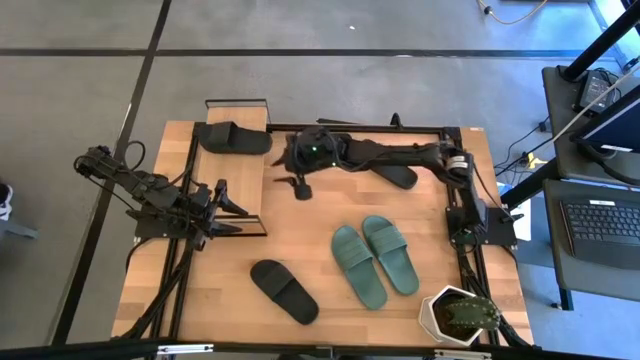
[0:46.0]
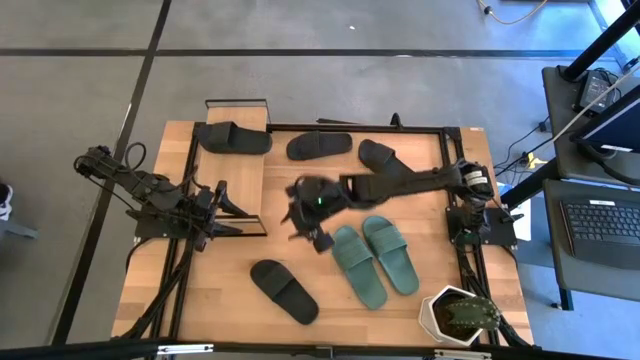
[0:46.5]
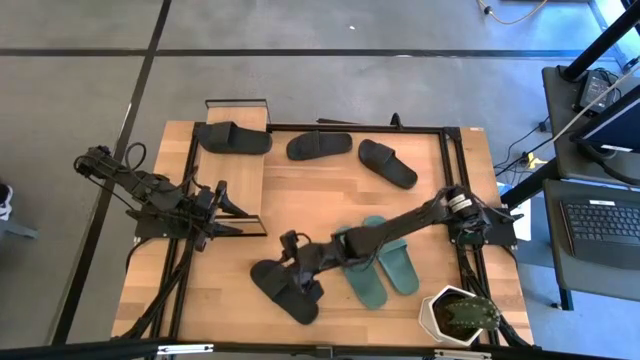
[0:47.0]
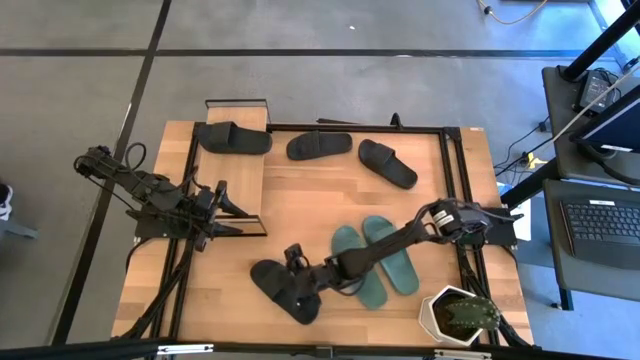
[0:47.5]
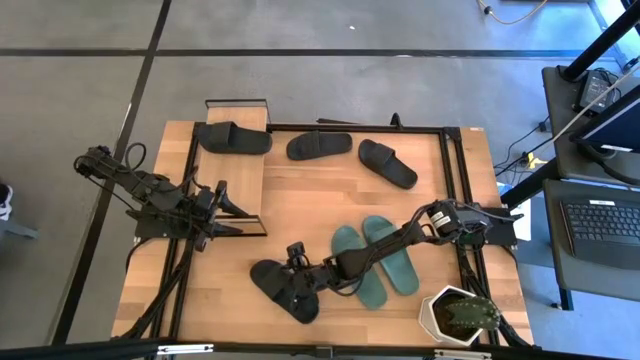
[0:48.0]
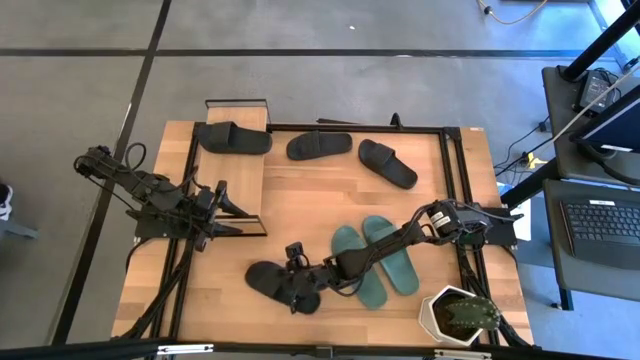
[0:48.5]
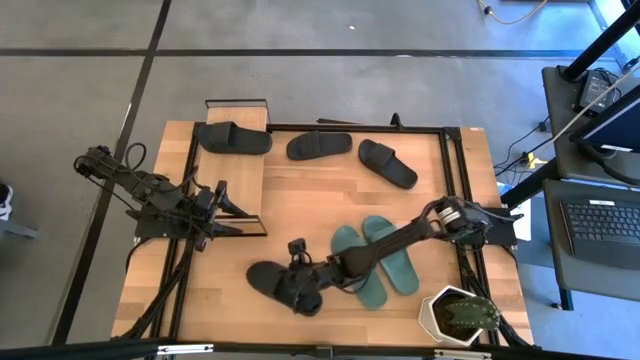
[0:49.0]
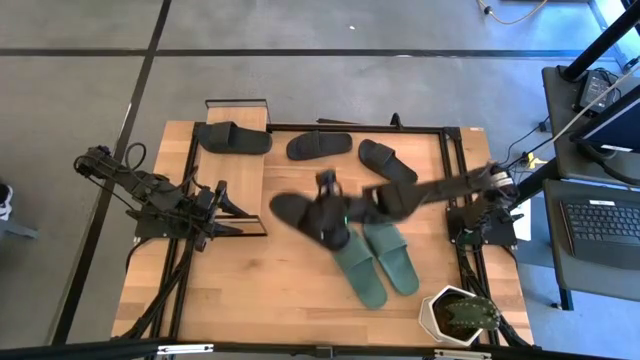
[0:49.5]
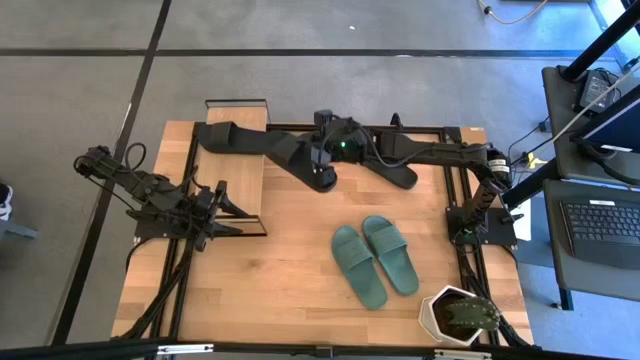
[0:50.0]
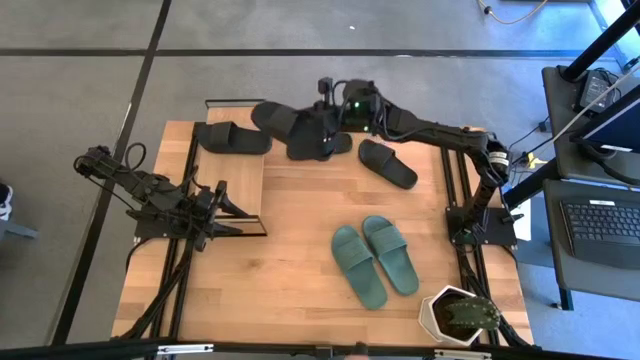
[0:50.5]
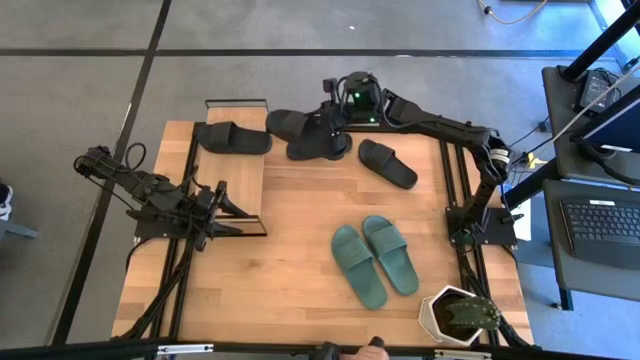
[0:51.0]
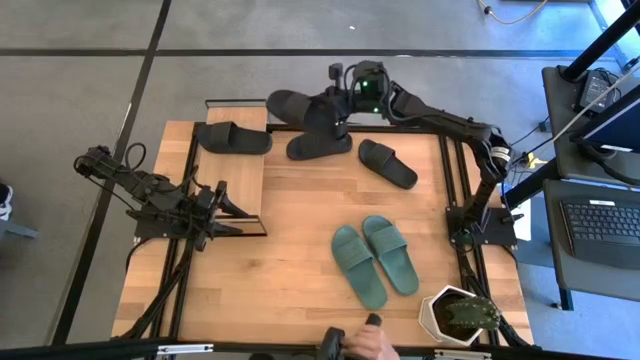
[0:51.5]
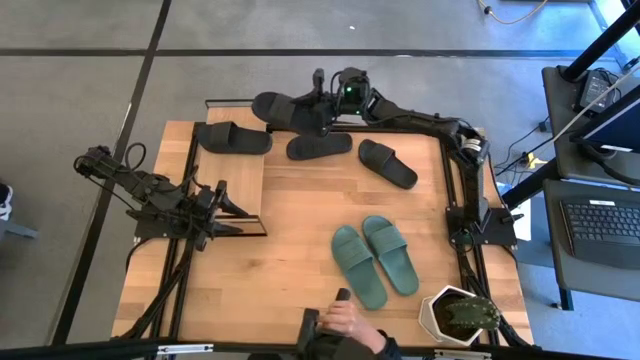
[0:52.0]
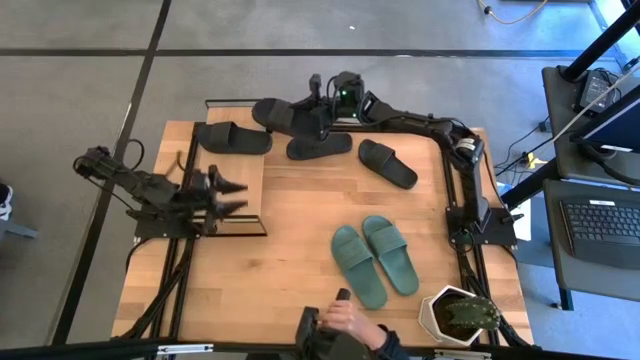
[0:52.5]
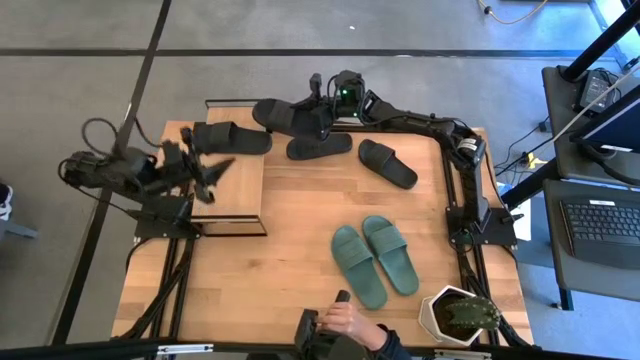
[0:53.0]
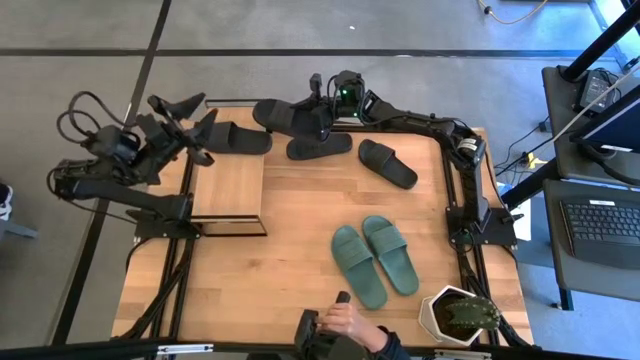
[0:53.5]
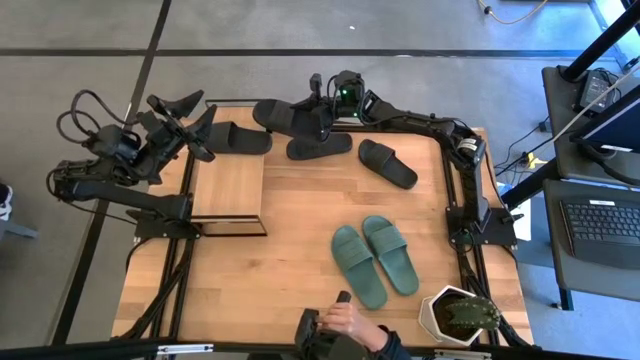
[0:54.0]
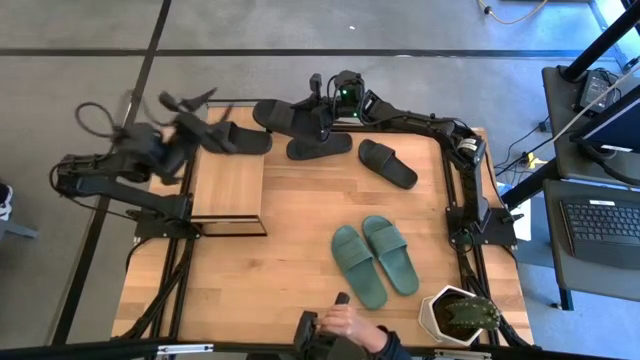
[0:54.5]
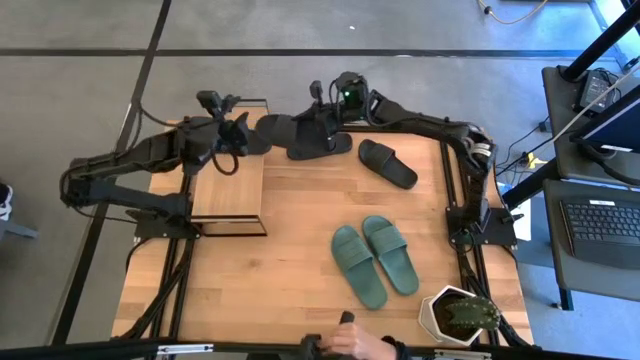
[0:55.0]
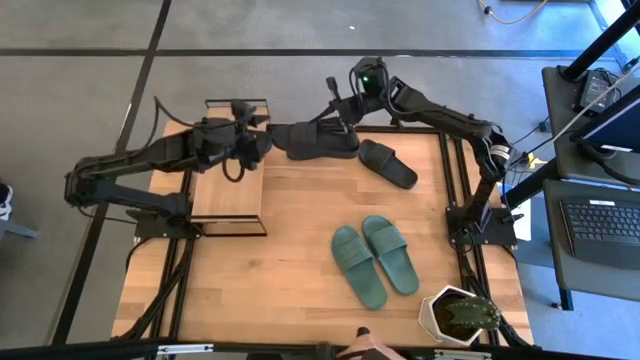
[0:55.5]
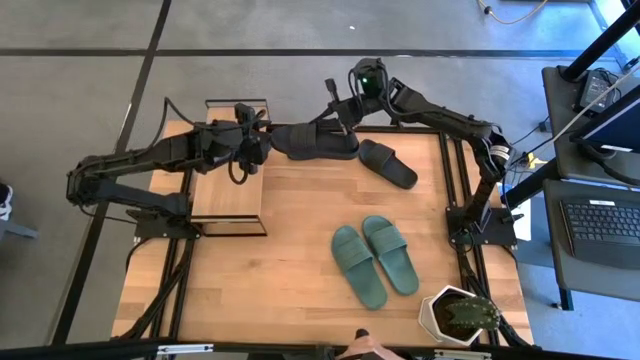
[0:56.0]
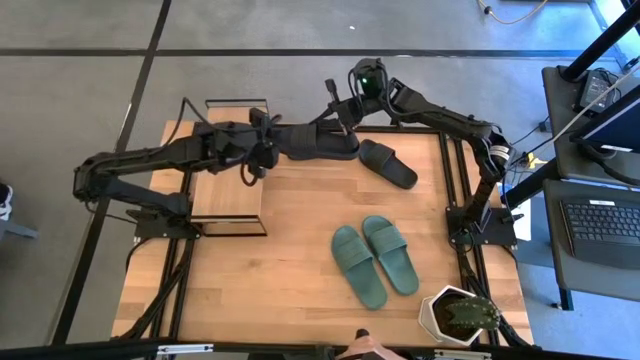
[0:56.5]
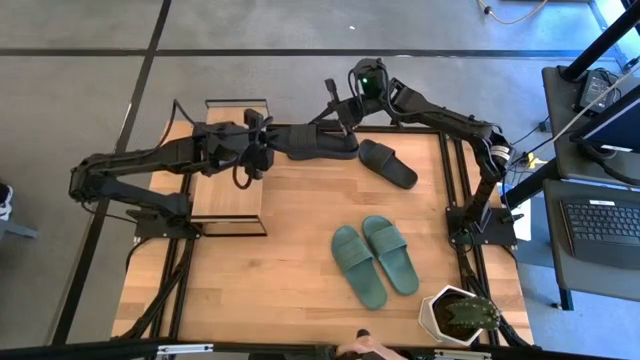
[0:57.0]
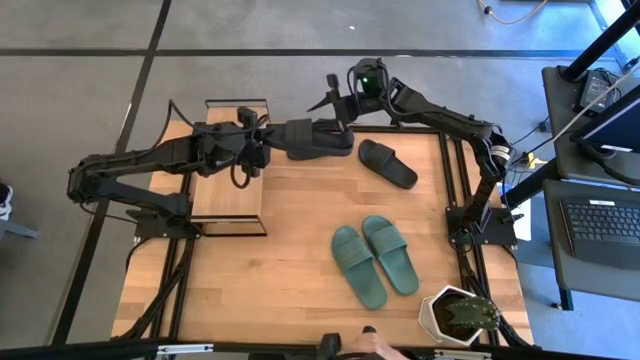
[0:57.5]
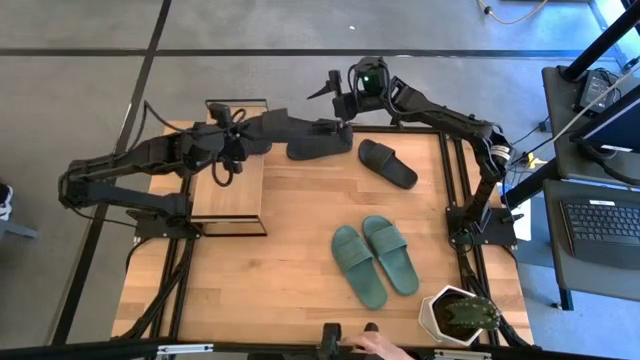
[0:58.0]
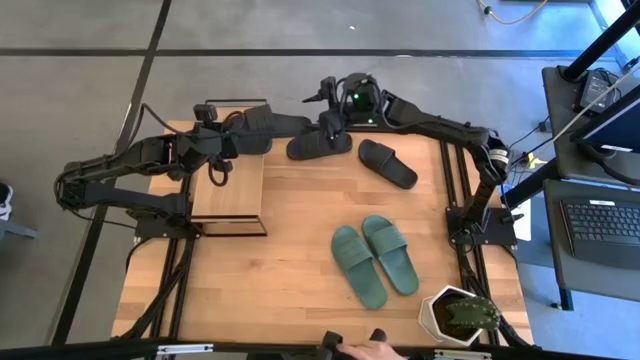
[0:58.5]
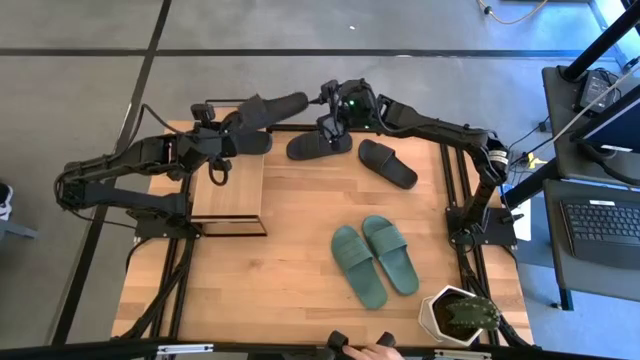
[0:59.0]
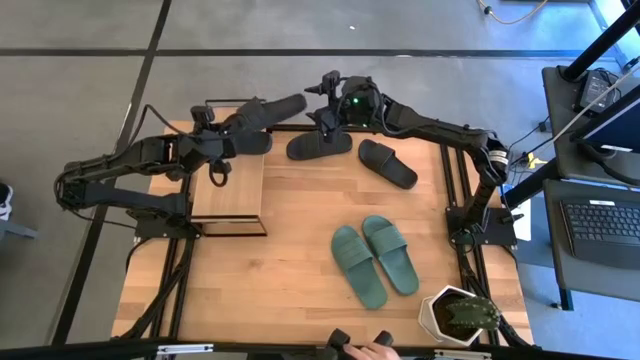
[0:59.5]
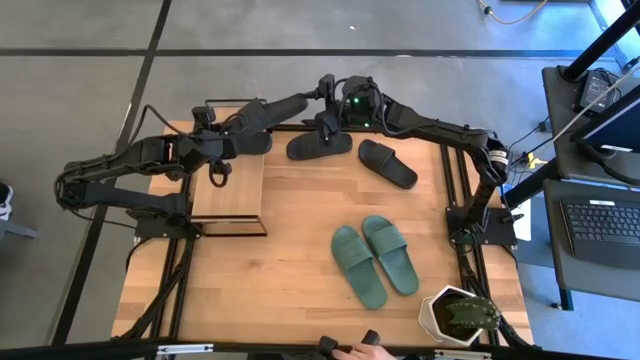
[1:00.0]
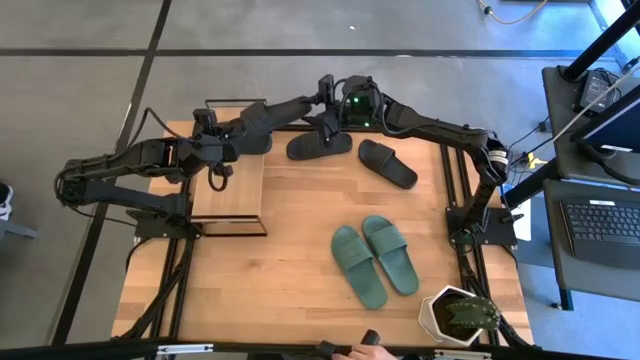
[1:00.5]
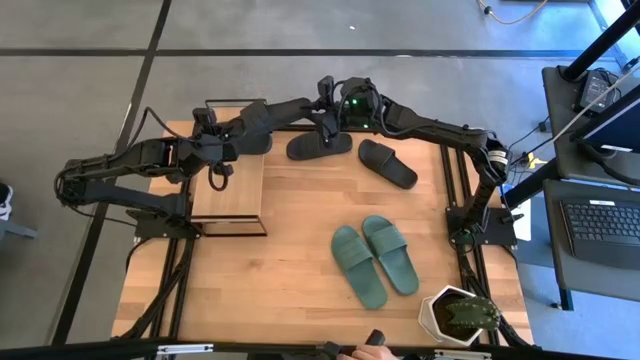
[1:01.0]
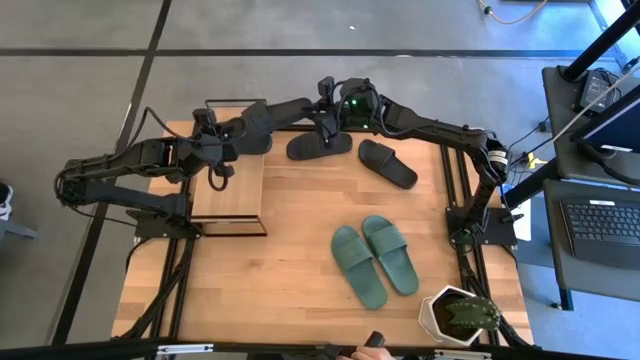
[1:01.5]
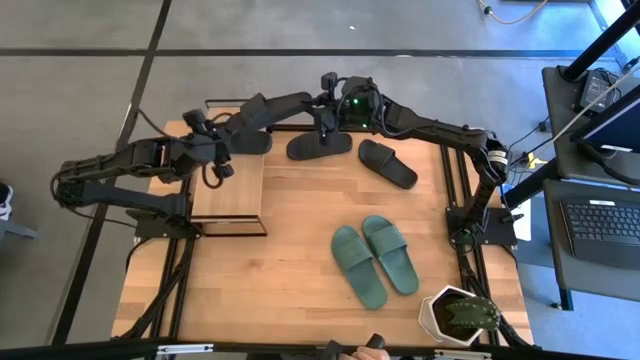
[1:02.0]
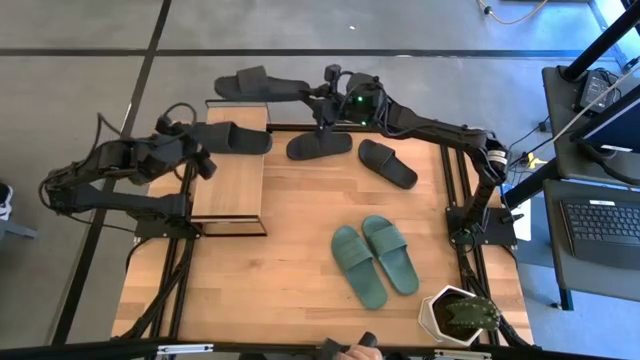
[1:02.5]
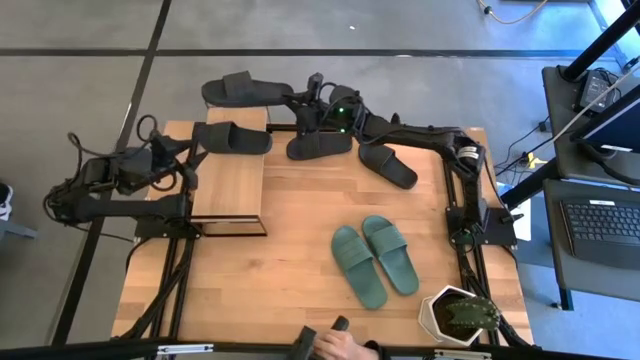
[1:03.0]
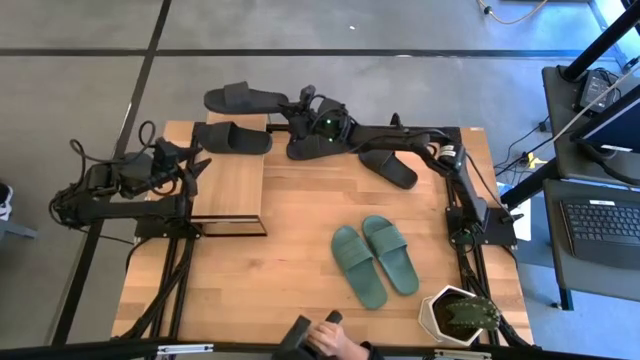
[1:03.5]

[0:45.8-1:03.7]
Task: Pick and place slides into the shelf
Put the black slipper on the shelf
